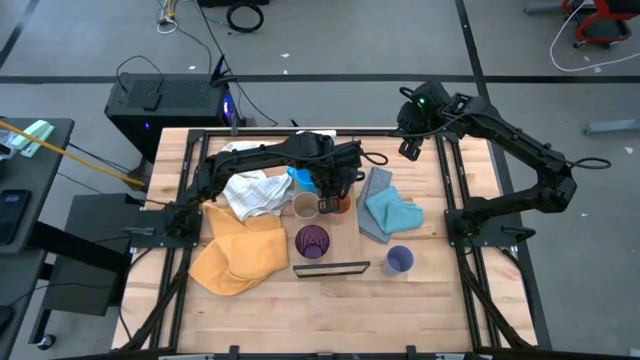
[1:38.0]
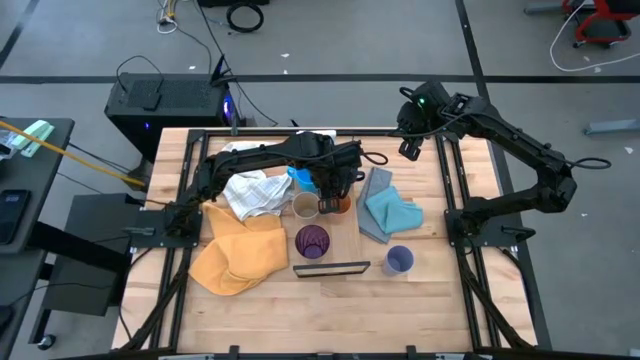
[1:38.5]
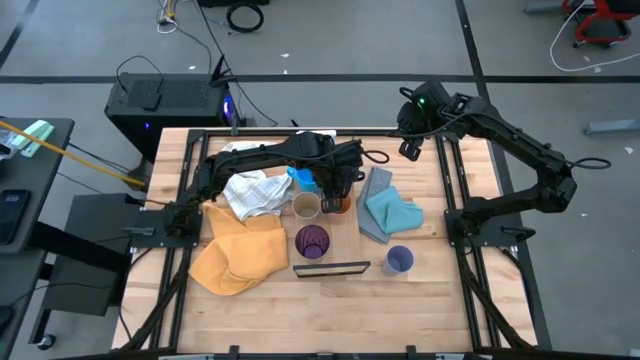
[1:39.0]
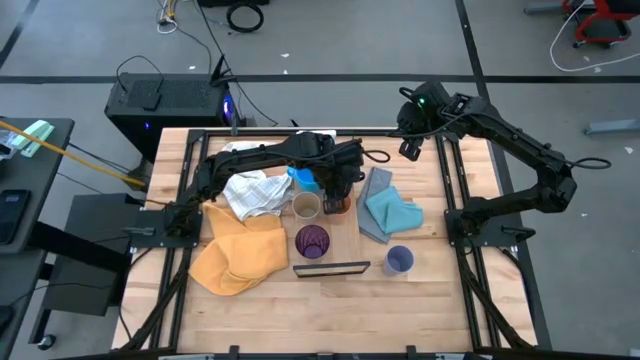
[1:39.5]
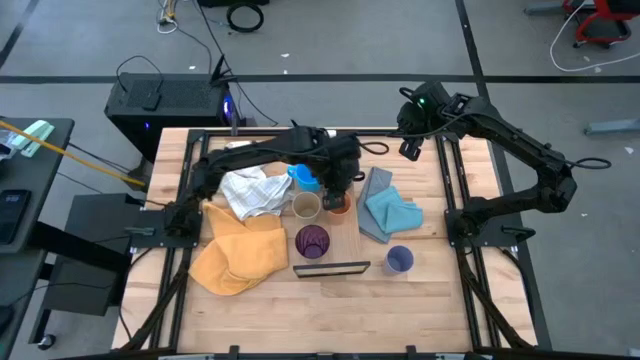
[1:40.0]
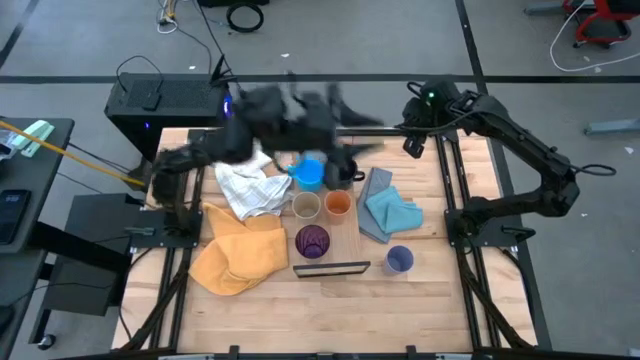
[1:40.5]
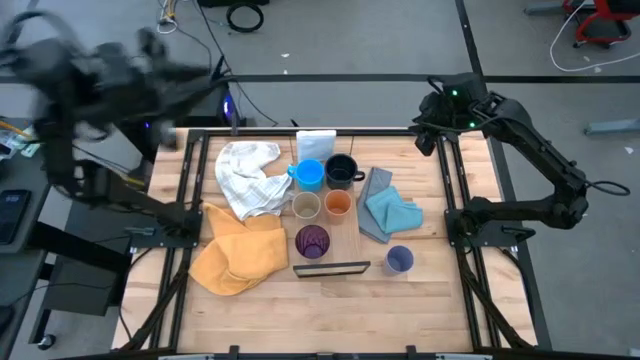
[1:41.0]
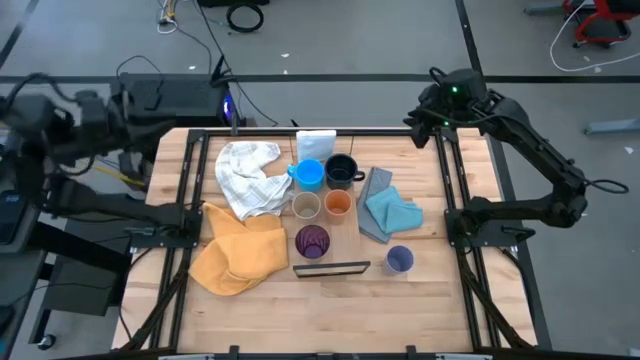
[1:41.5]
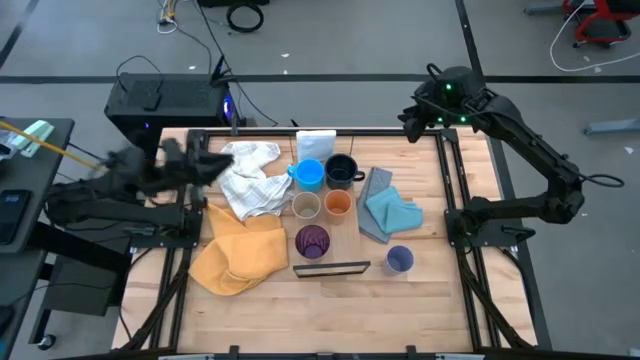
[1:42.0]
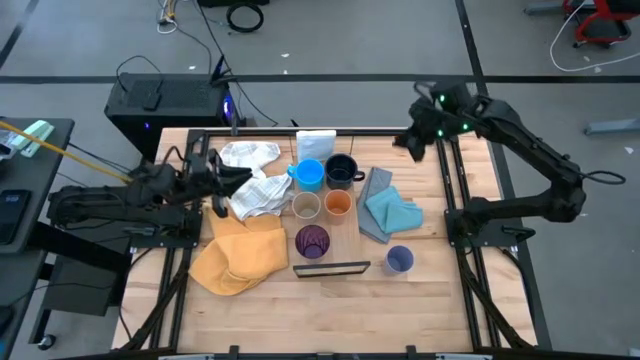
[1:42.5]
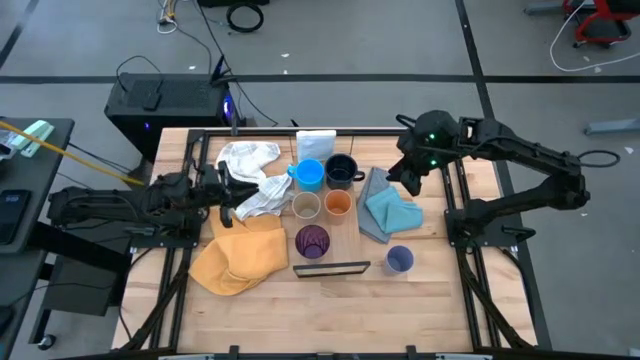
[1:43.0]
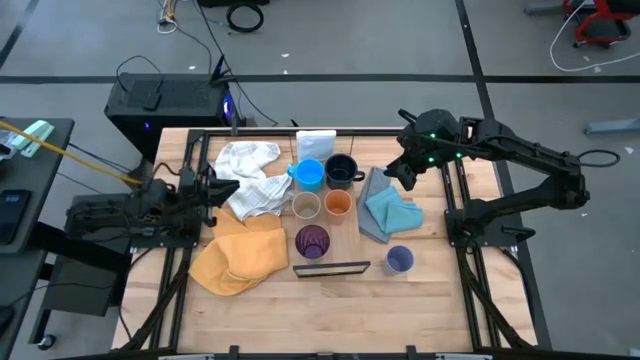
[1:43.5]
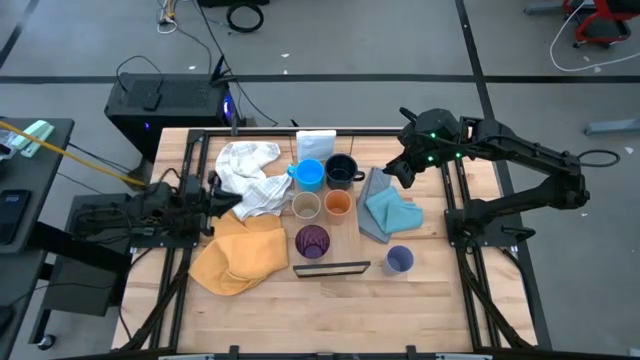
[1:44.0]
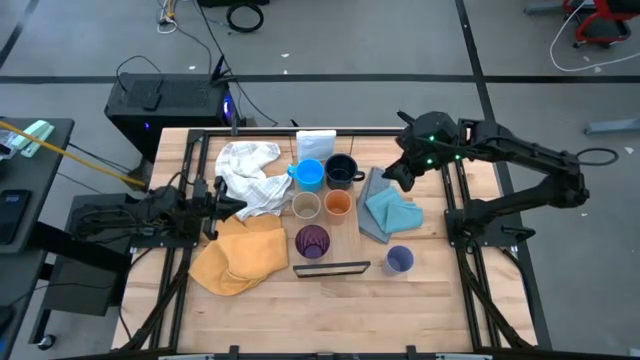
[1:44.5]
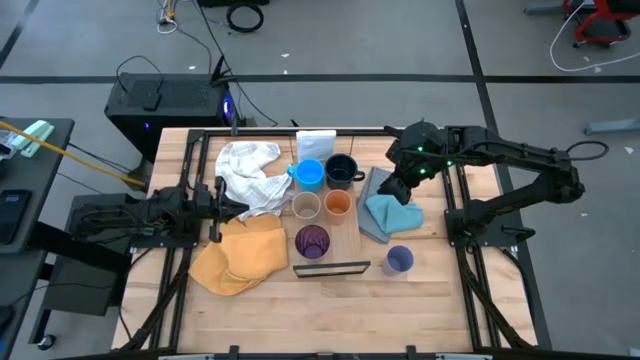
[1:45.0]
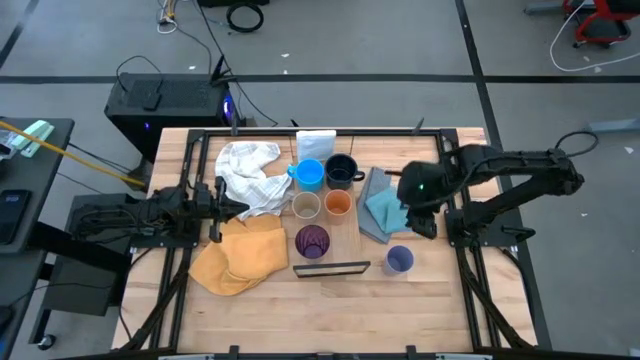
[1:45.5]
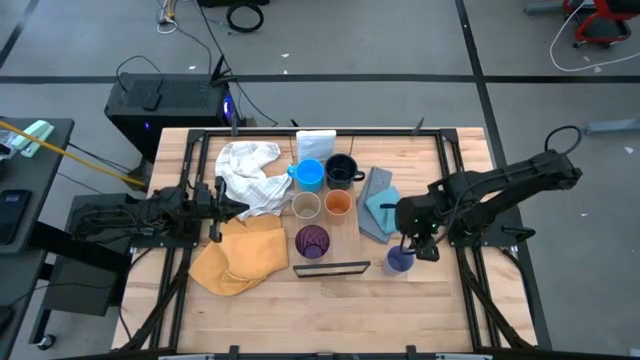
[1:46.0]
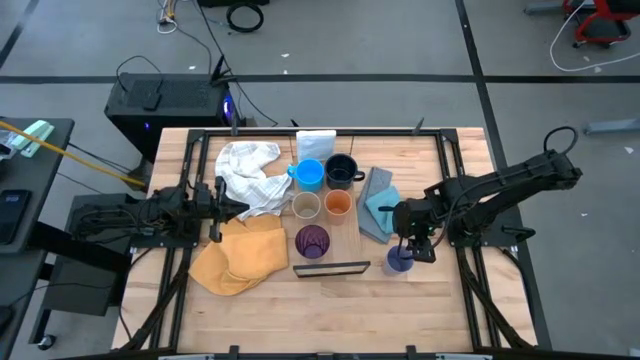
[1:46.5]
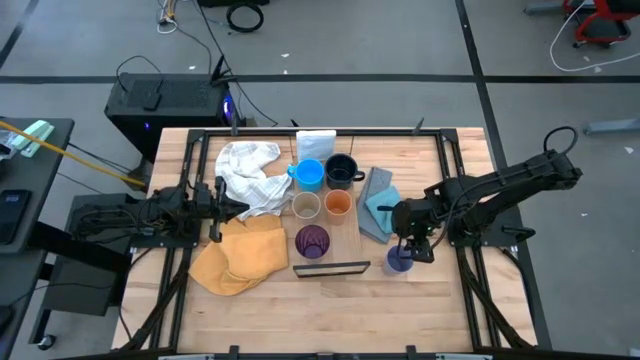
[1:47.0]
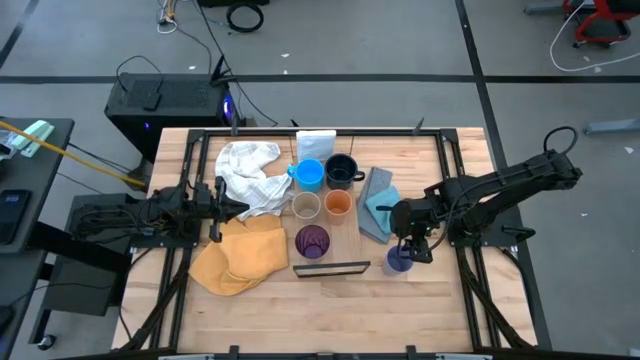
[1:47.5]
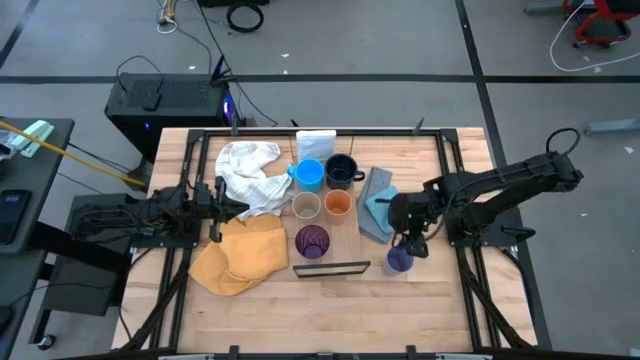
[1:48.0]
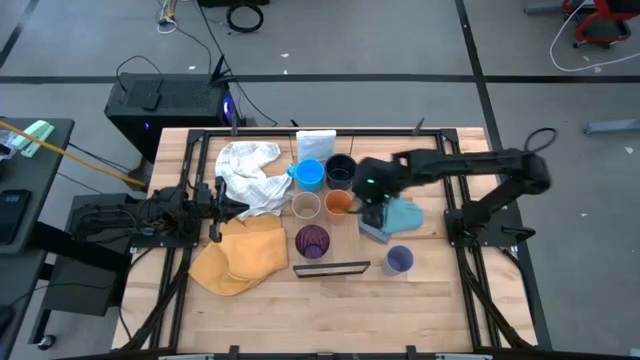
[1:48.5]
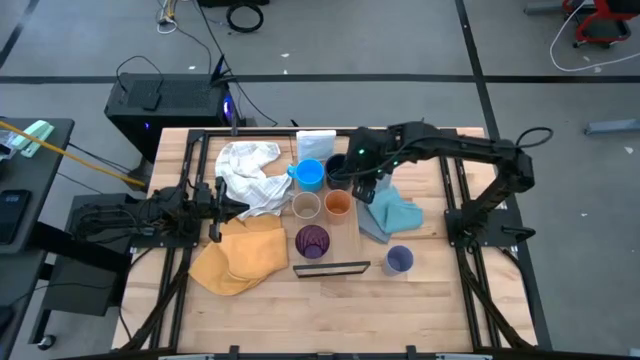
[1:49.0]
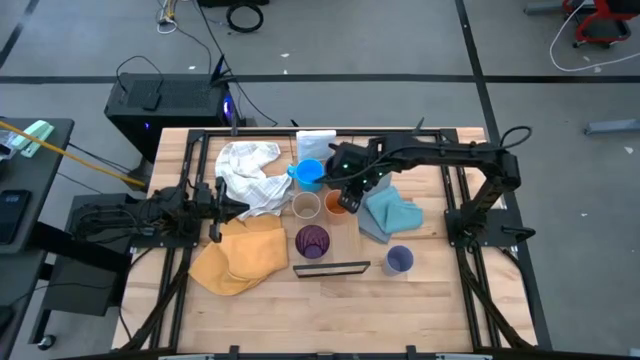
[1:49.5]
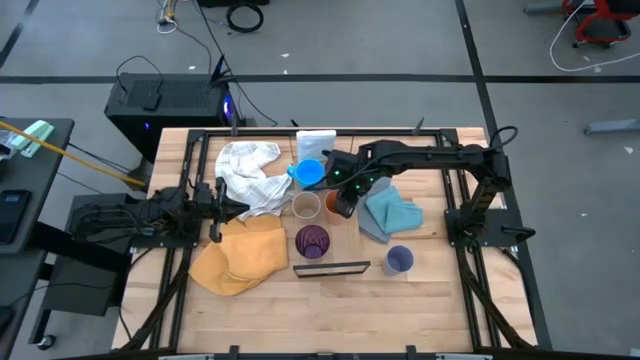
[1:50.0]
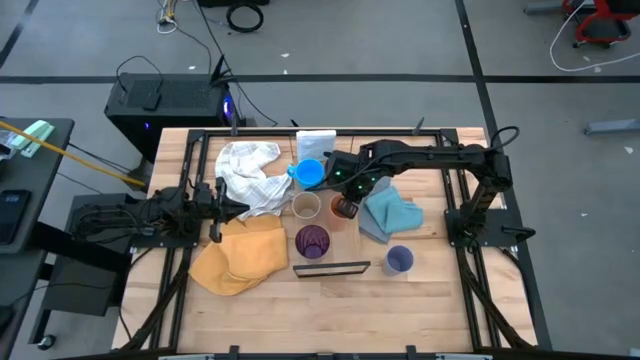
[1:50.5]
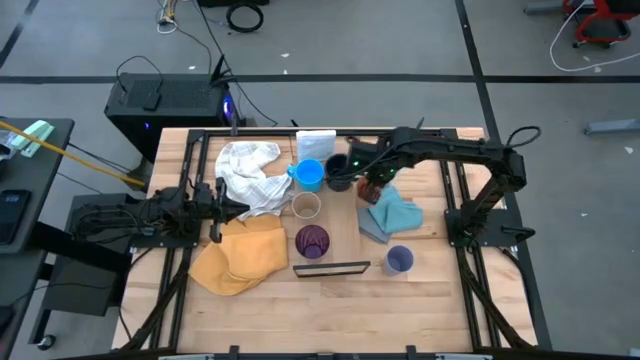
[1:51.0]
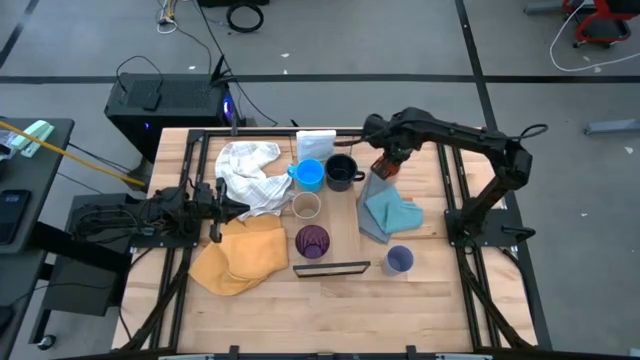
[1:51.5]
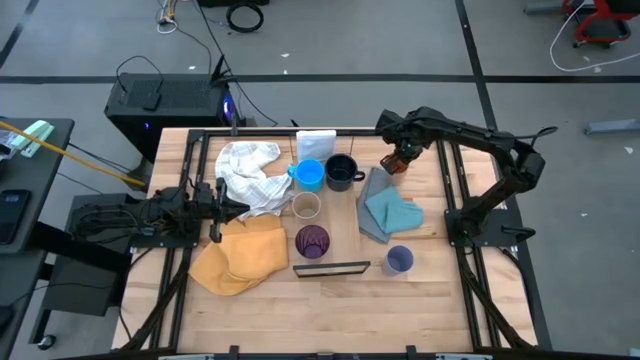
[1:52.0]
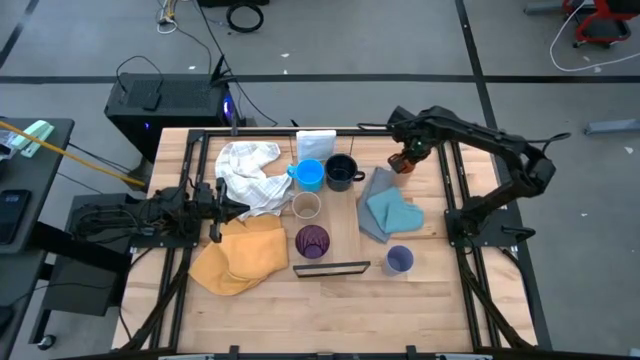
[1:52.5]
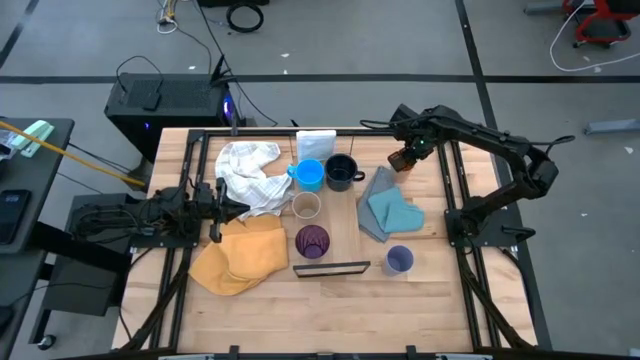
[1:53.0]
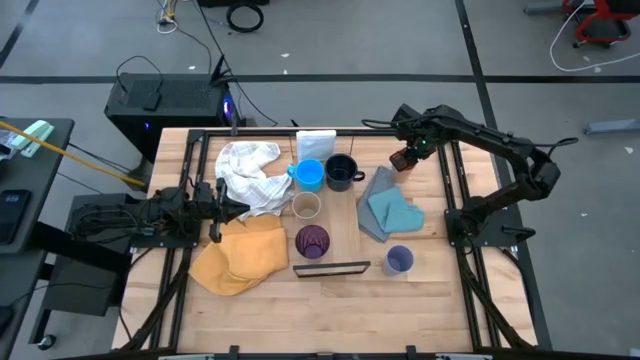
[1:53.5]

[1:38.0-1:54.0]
Task: Stack small to large cups/mugs on shelf
Remove the orange cup from the shelf
